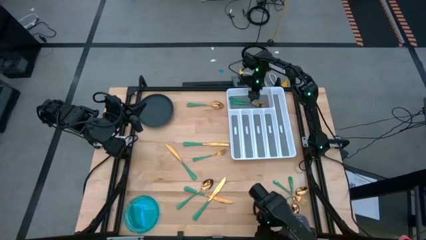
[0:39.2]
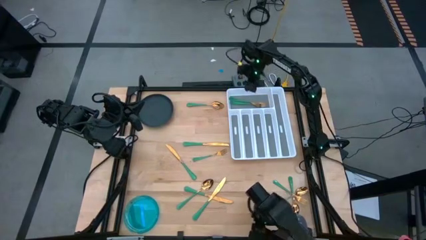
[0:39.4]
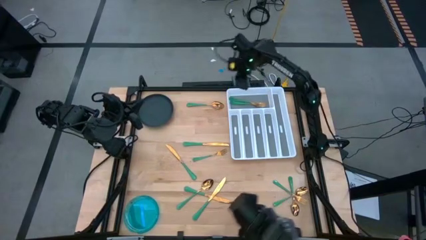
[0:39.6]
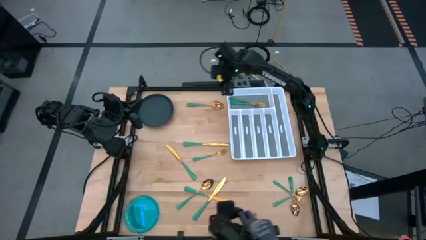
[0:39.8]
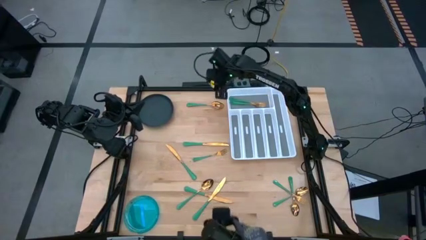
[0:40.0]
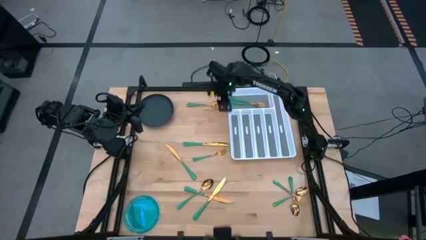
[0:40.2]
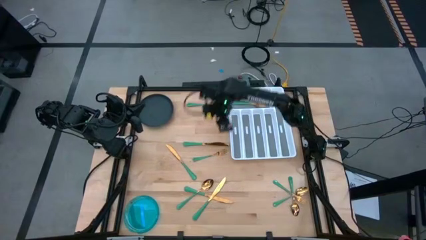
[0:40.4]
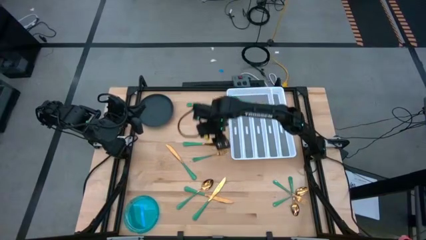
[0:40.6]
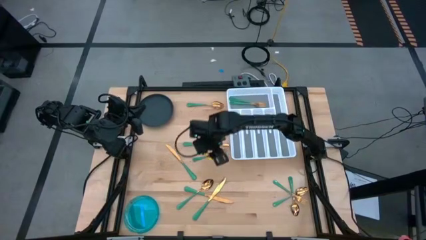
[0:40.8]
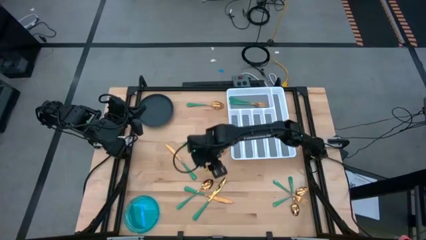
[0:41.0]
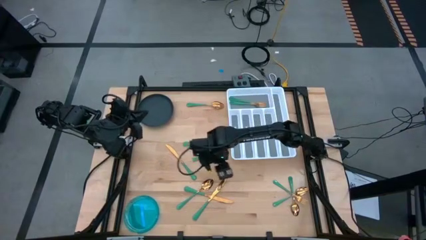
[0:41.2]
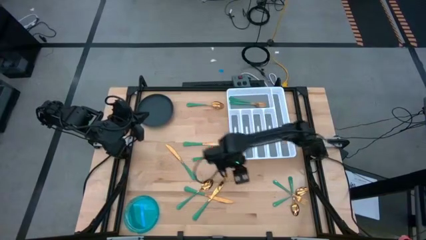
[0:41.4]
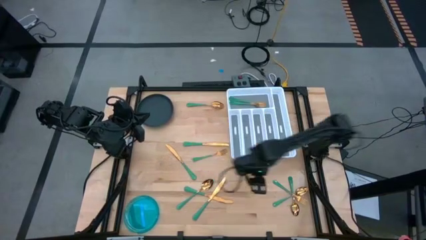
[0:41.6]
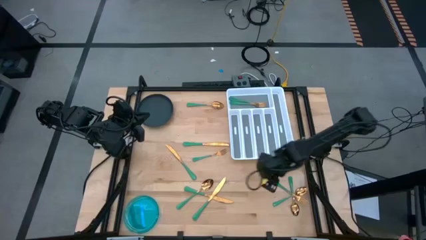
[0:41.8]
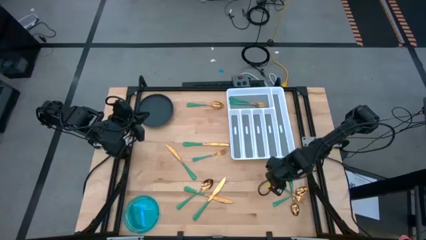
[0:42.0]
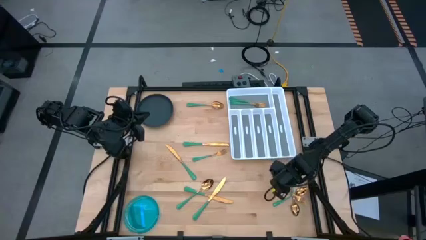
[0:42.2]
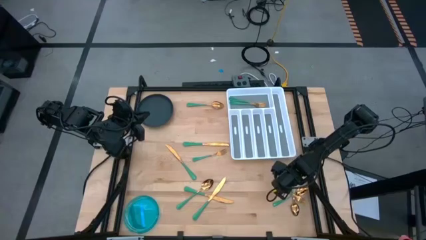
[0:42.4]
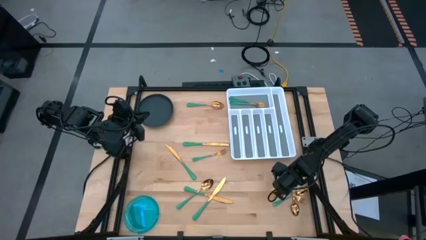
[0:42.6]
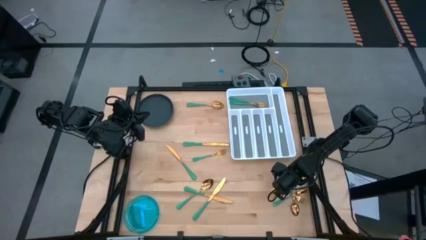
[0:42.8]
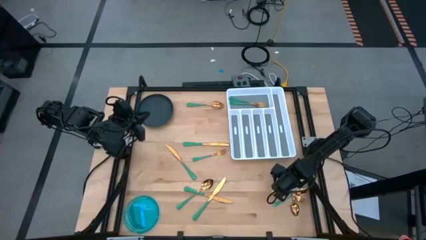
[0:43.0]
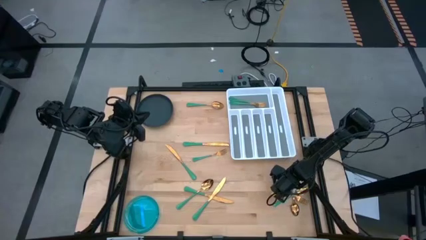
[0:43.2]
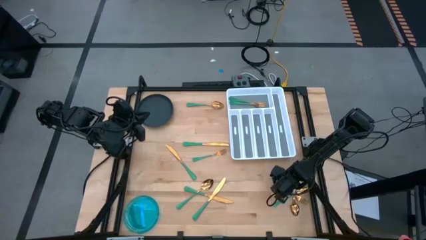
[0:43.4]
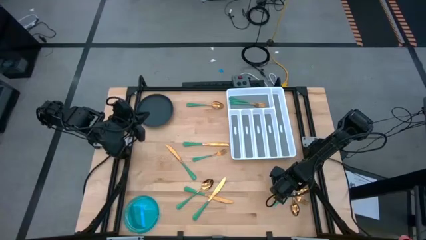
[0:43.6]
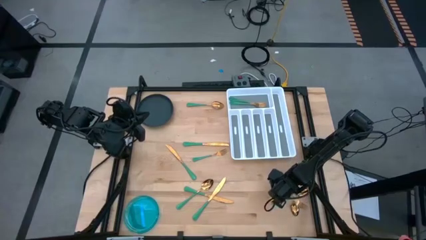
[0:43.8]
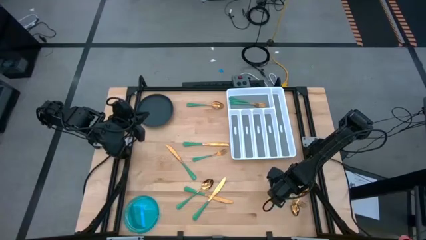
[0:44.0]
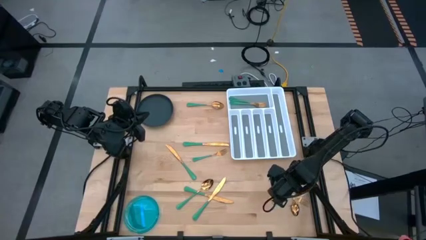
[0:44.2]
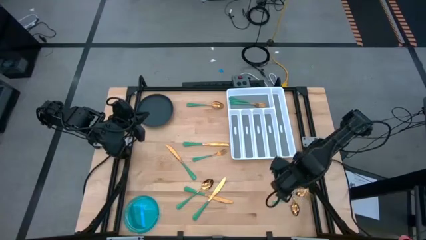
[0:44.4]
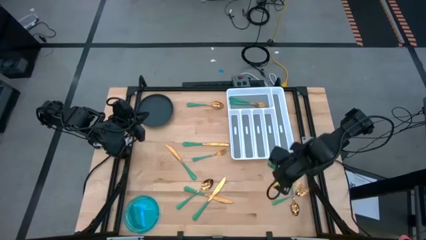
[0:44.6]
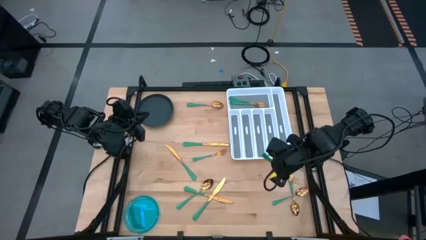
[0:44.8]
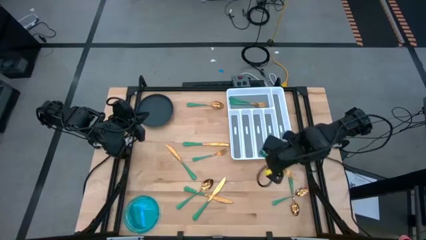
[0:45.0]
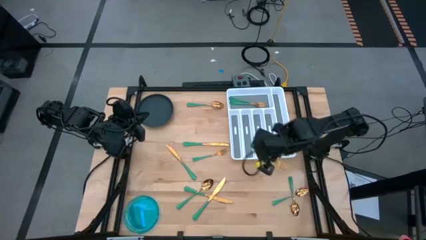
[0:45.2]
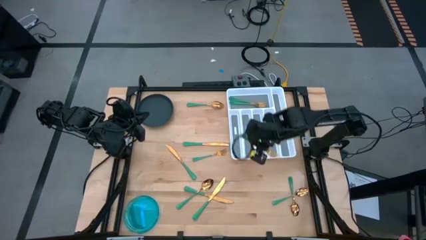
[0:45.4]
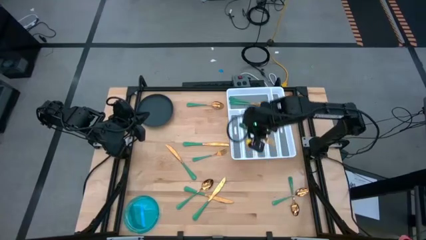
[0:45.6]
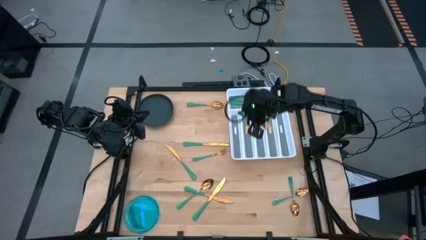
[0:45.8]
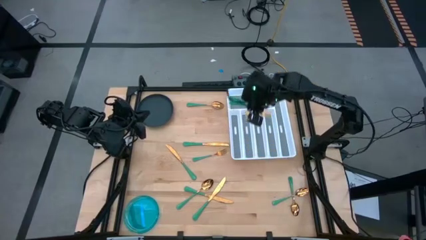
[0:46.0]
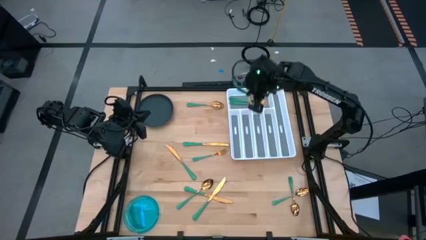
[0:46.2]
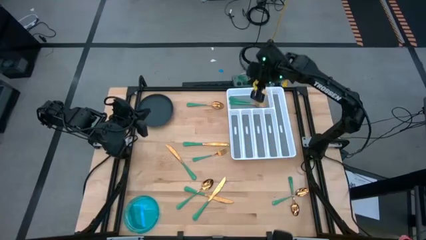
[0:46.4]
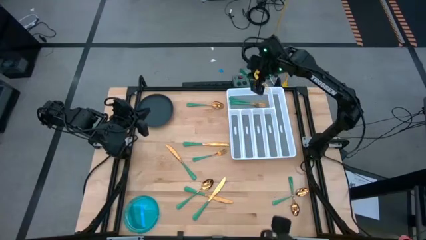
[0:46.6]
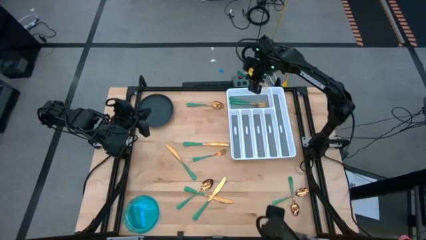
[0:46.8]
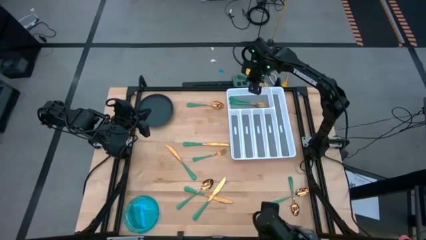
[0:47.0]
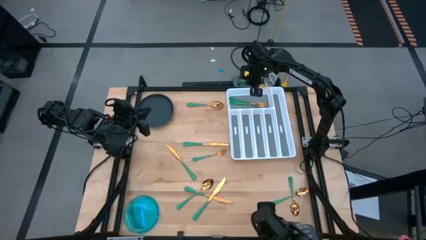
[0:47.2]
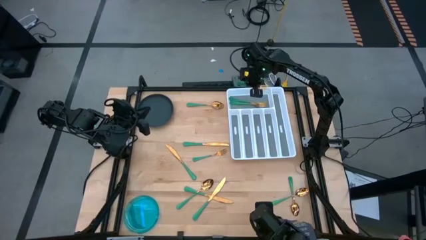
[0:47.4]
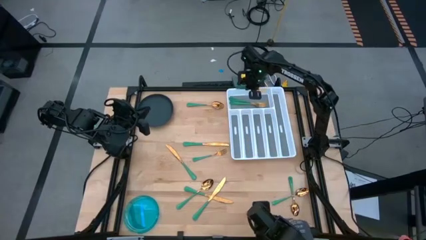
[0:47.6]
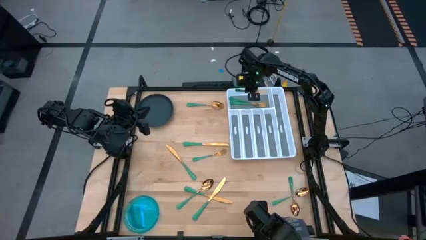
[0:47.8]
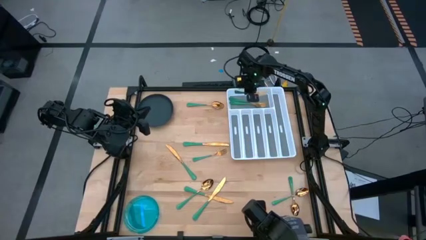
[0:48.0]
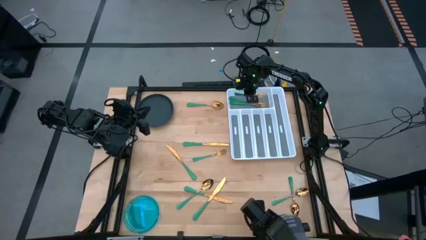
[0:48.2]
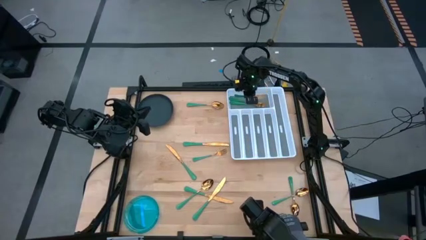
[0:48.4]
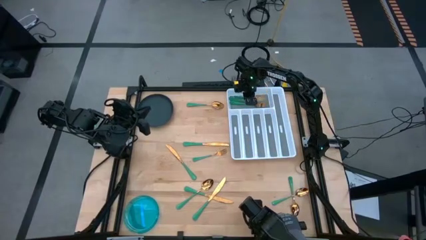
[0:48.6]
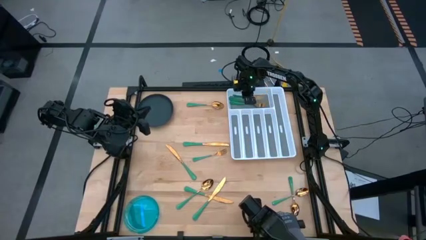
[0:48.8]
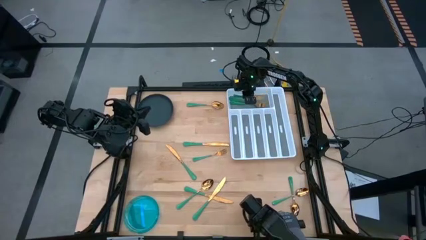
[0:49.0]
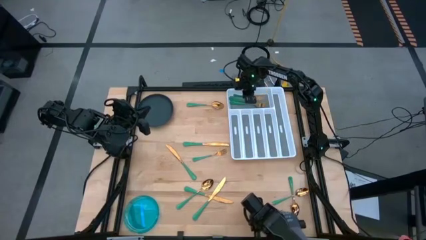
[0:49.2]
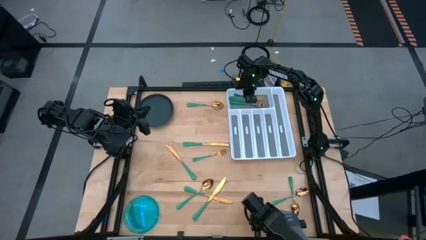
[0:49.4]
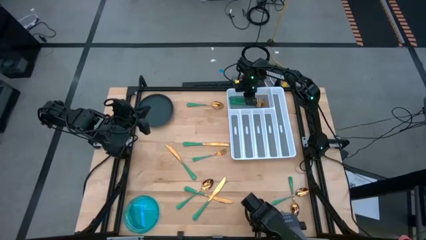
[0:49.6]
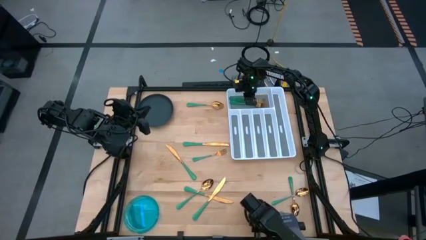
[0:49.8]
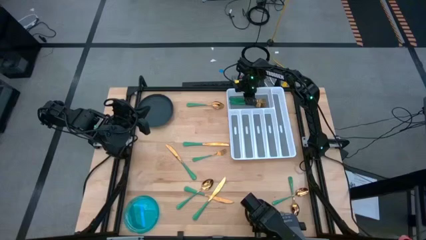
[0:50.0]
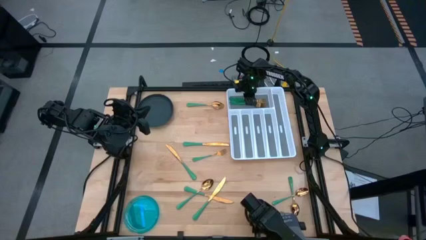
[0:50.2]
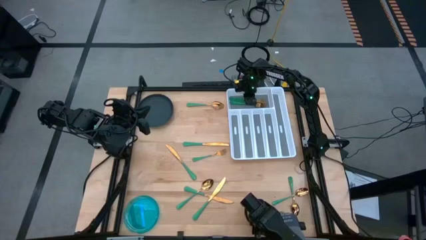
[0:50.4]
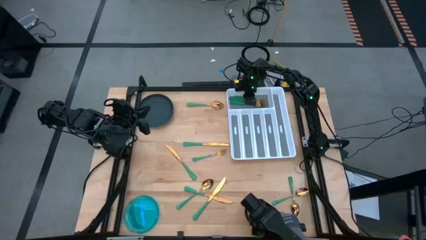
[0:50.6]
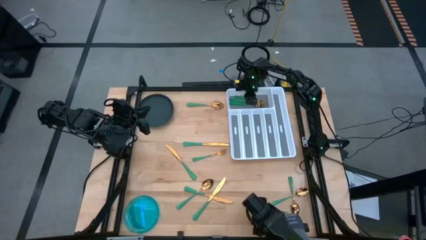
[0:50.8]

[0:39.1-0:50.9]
Task: Sort silverware
Put the green fork into the silverware tray
